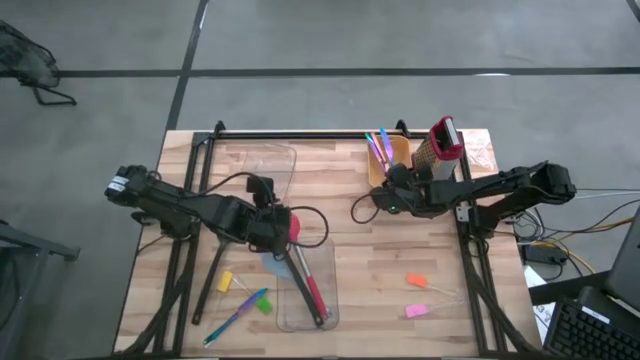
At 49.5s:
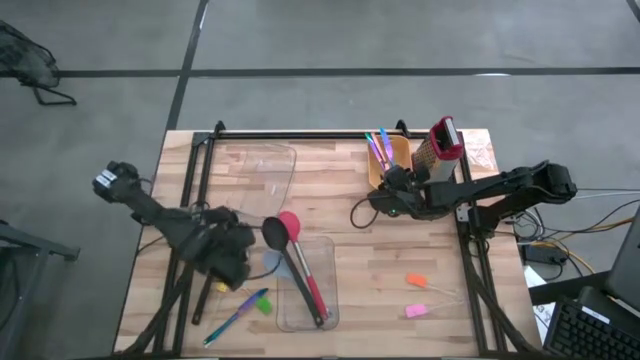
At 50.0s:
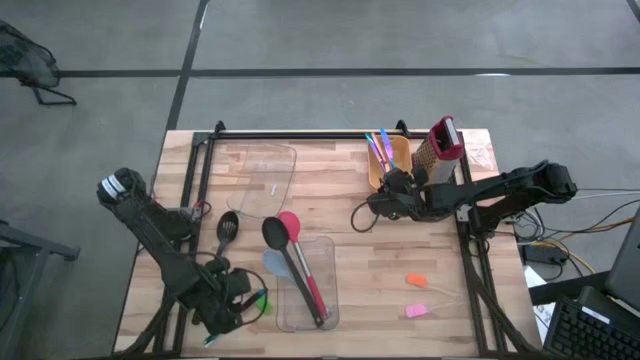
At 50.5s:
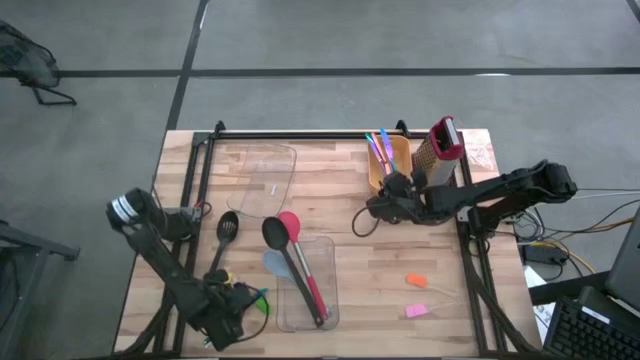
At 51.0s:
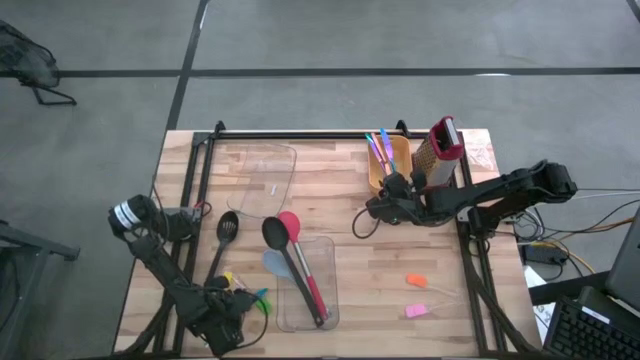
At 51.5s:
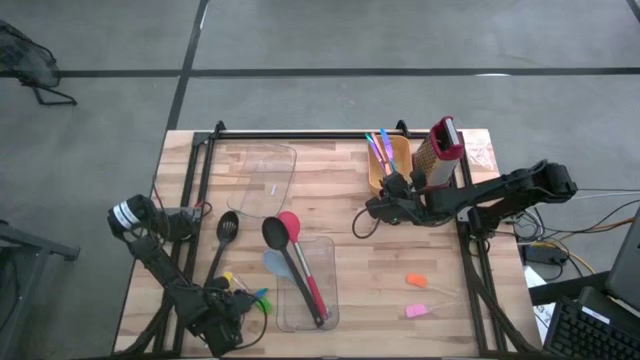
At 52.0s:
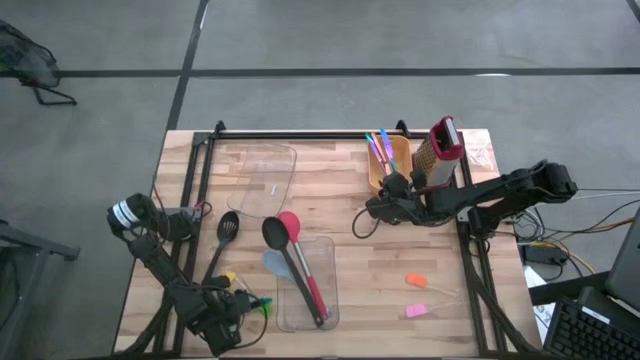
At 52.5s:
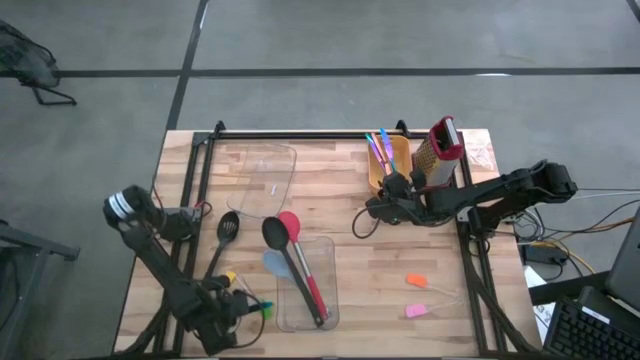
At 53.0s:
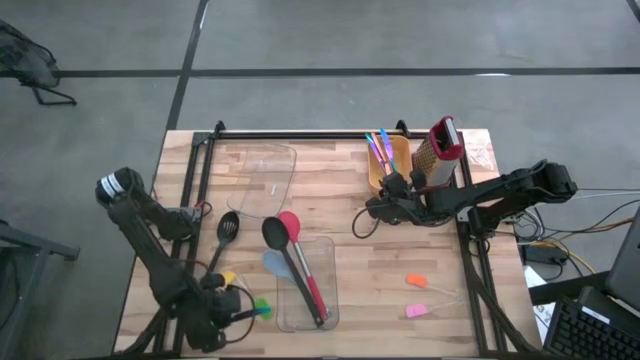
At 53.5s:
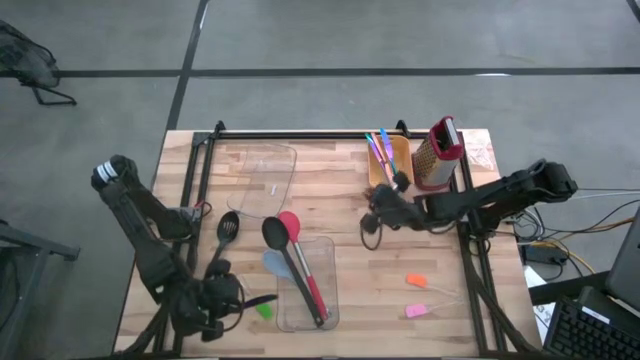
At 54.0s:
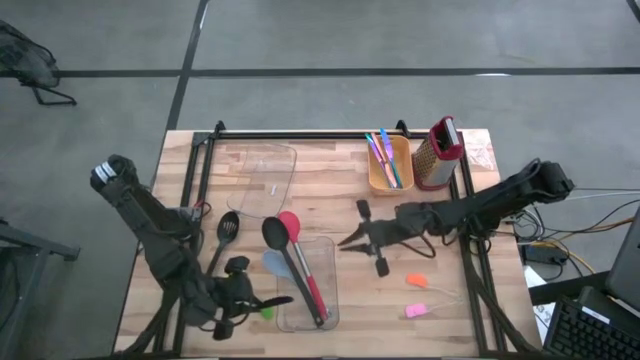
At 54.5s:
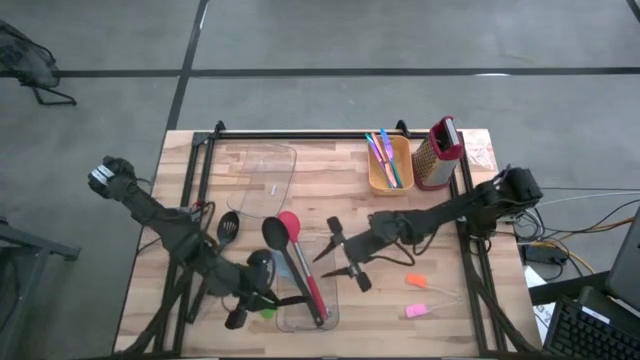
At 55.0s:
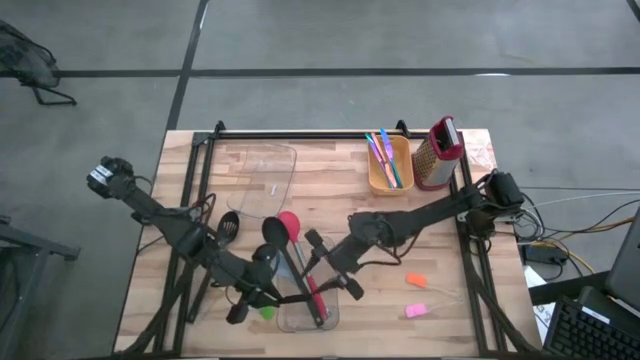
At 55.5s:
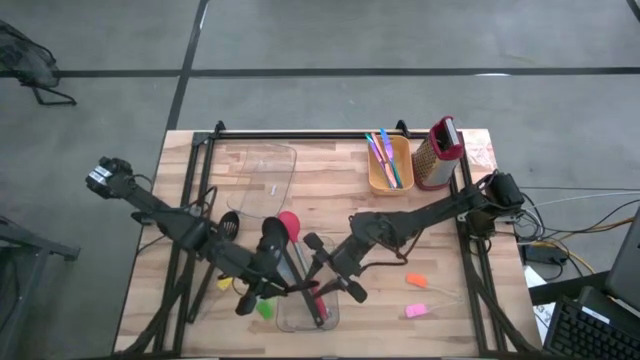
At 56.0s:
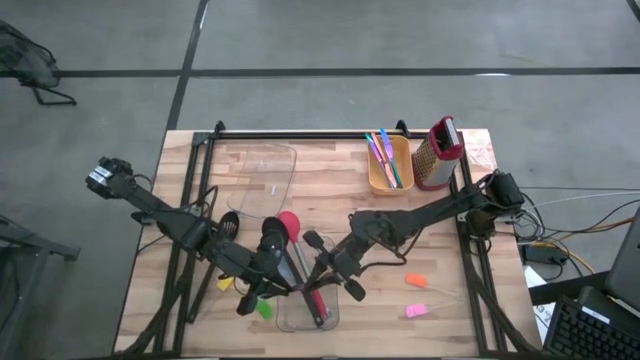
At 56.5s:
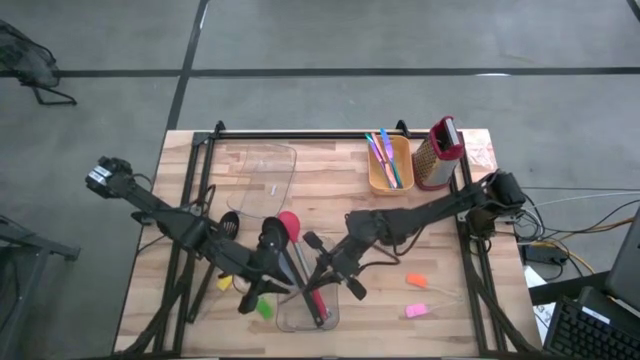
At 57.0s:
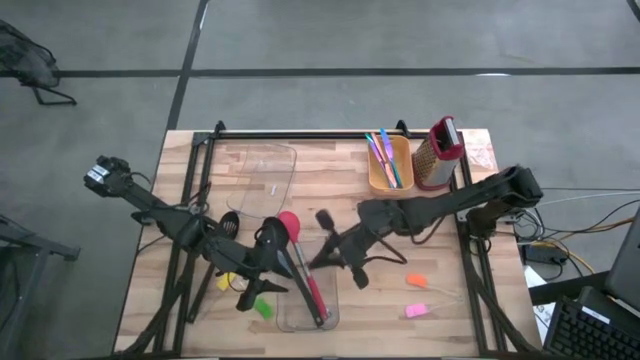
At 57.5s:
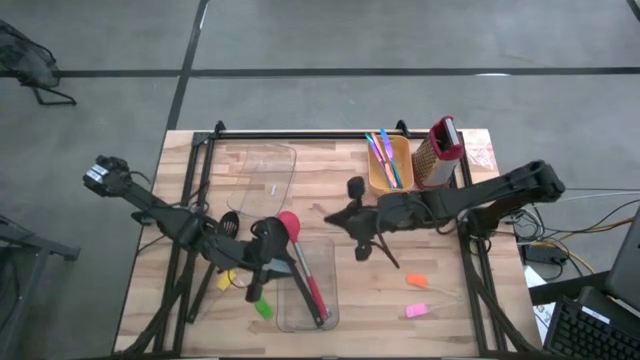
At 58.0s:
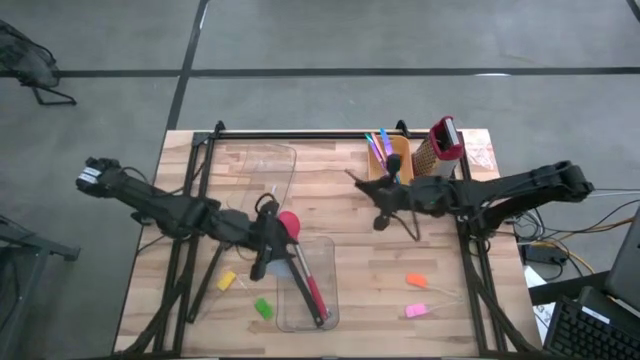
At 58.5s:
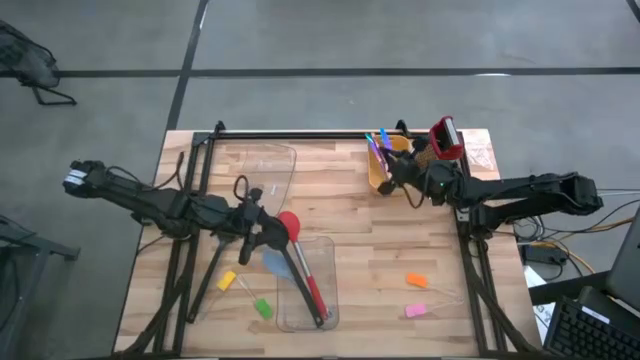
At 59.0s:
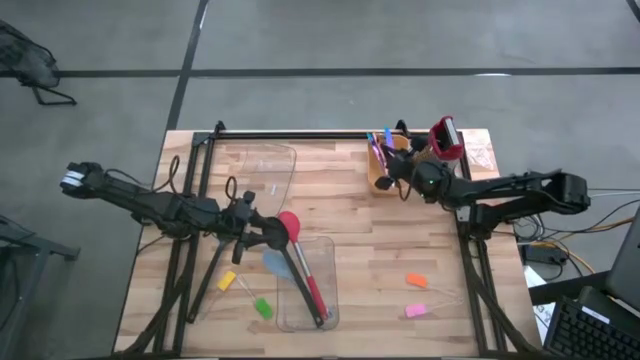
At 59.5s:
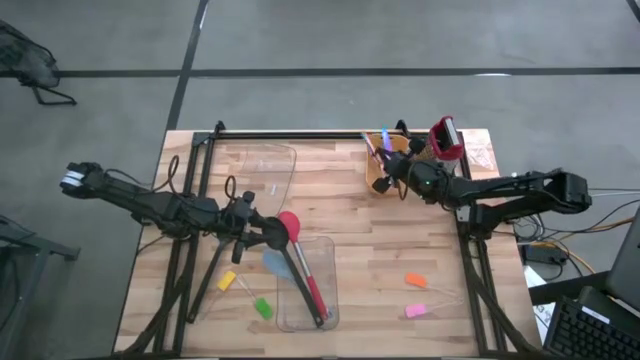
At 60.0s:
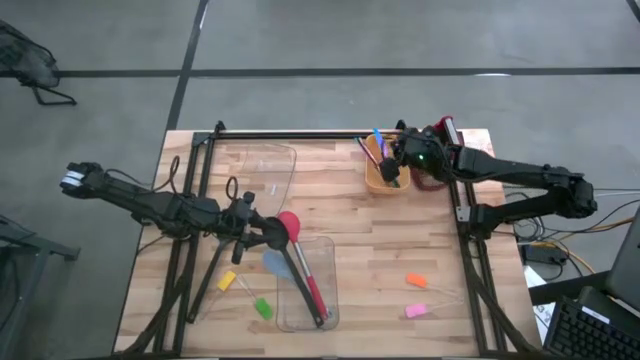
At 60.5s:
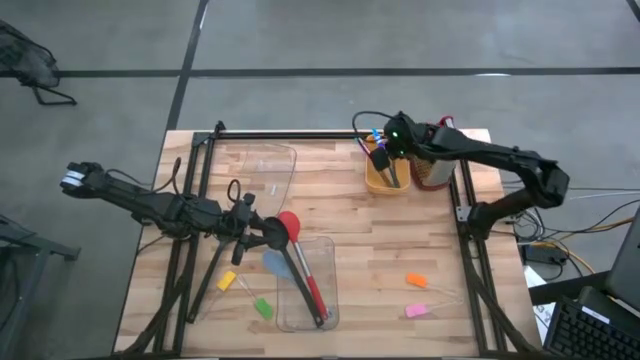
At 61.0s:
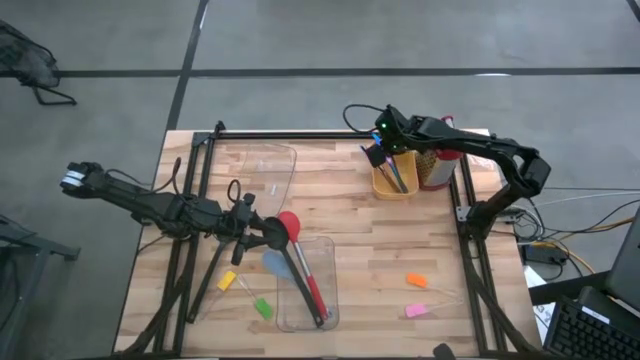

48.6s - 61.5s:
Task: Pick & Place Kitchen Items
Put the blue knife into the yellow bin

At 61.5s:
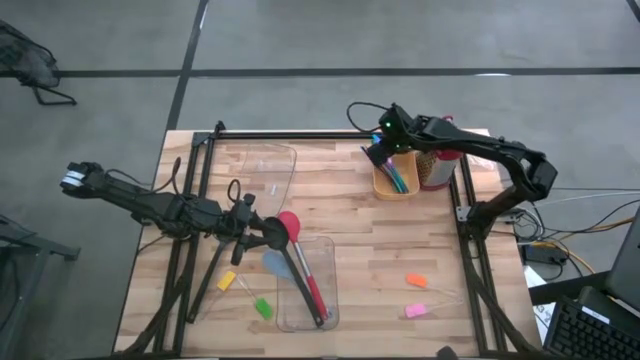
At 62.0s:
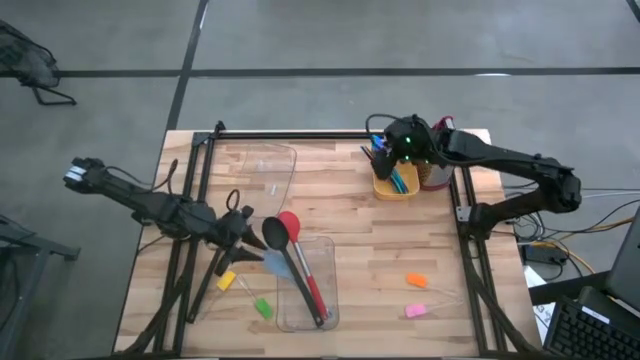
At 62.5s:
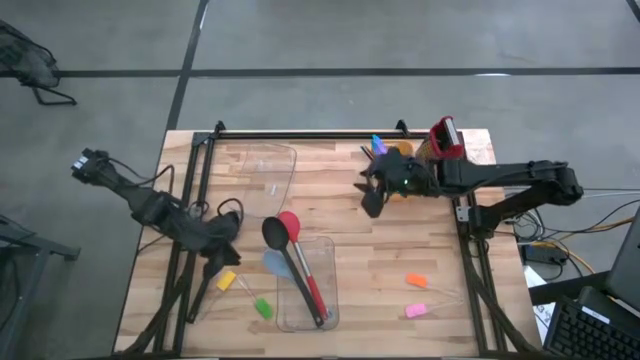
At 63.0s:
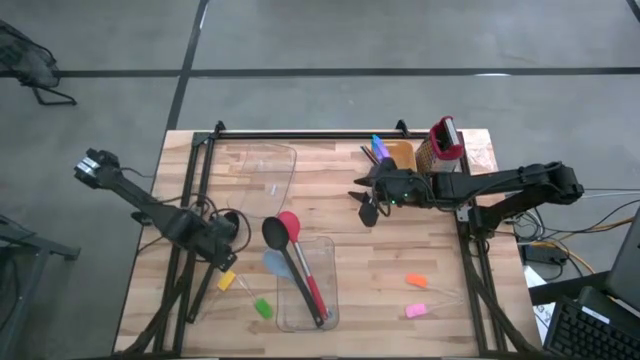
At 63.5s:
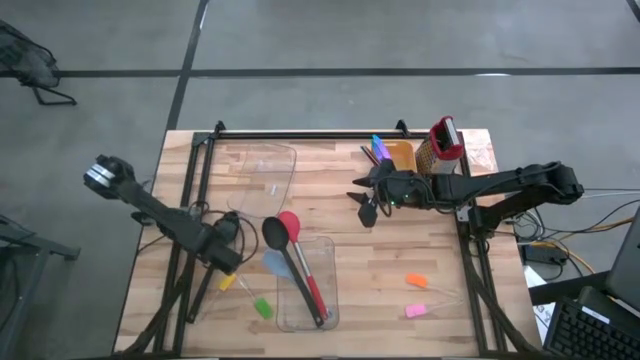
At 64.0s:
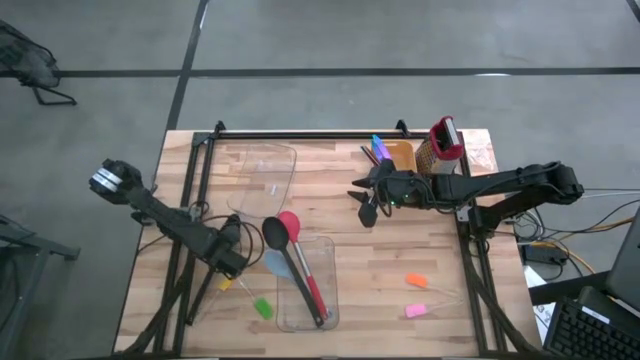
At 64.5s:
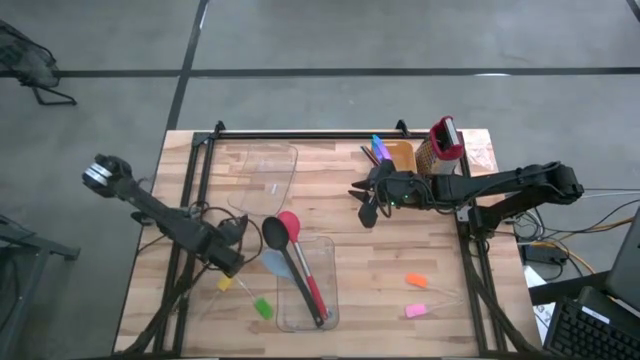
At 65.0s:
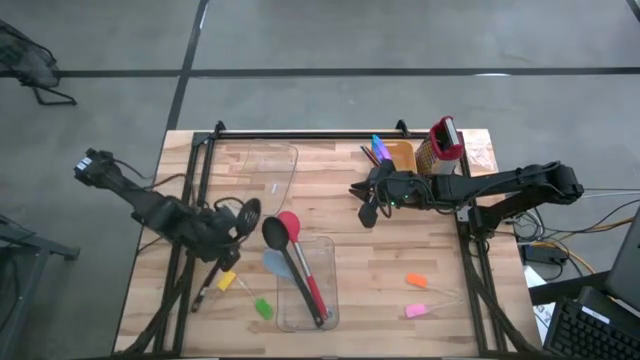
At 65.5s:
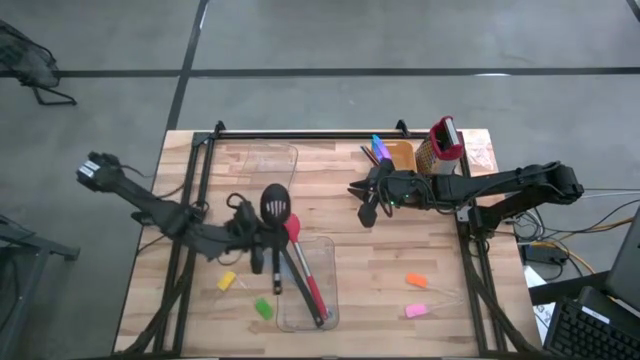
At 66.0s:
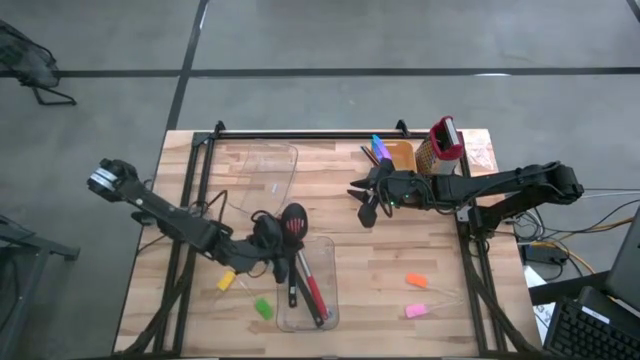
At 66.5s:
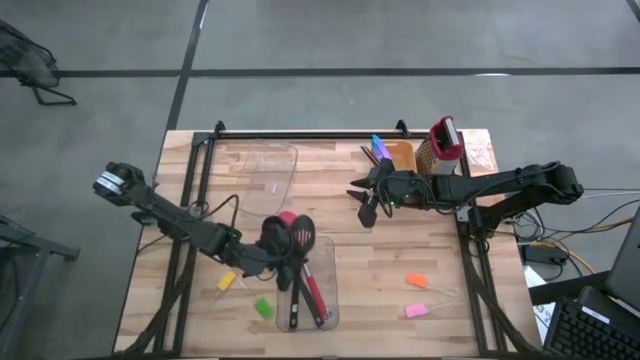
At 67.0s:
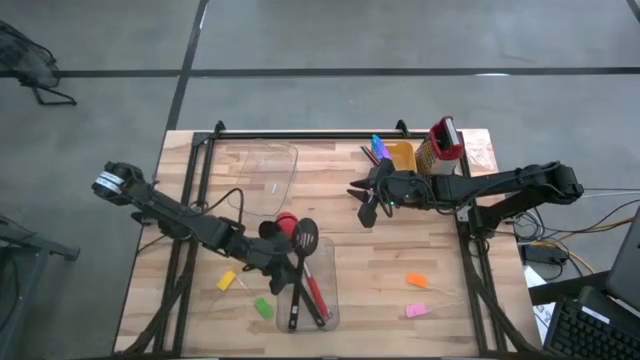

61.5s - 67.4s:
Put the black serving spoon into the bottom transparent bin

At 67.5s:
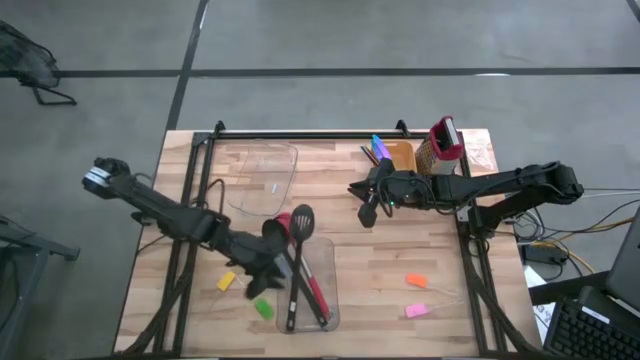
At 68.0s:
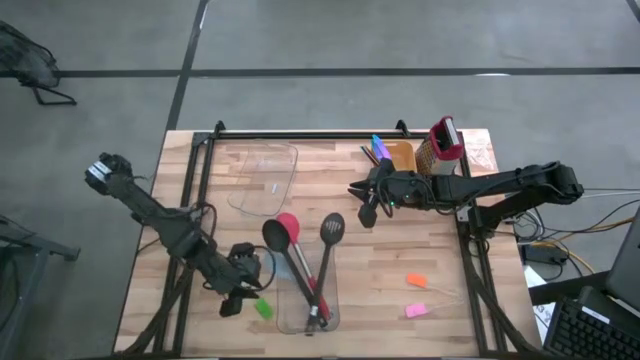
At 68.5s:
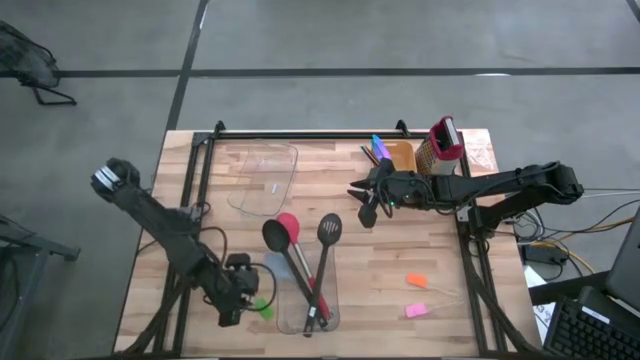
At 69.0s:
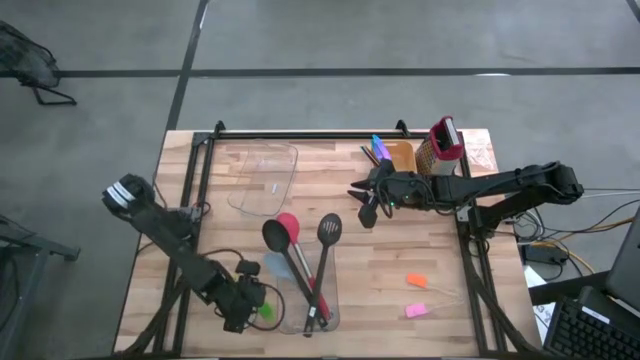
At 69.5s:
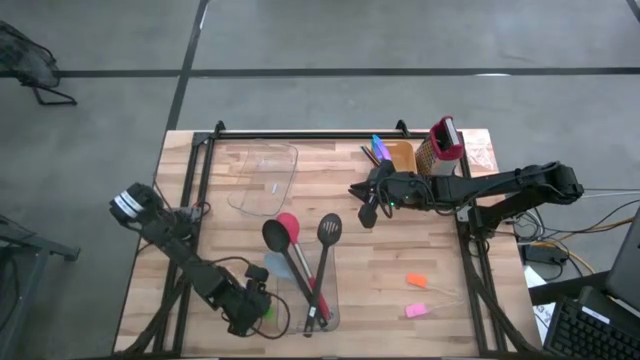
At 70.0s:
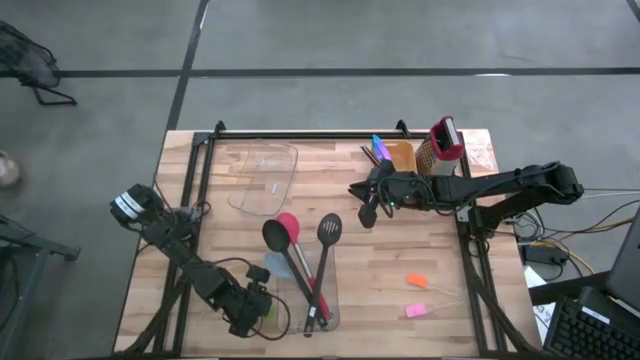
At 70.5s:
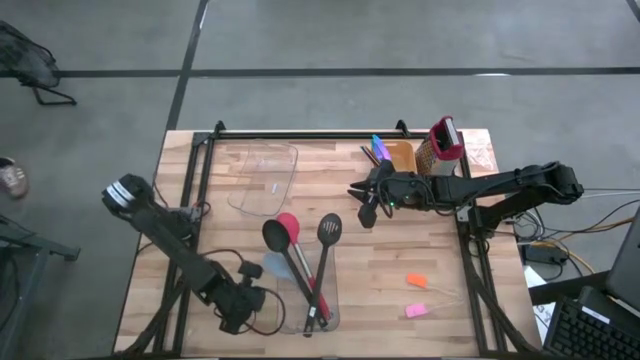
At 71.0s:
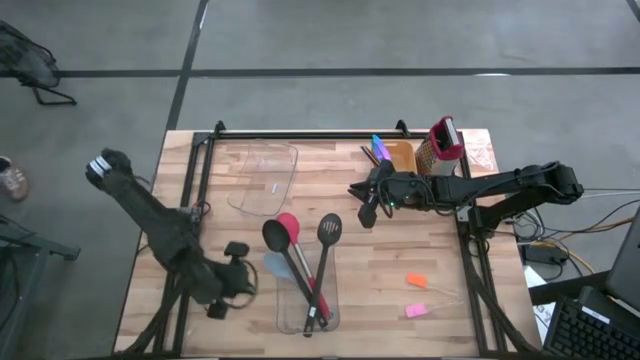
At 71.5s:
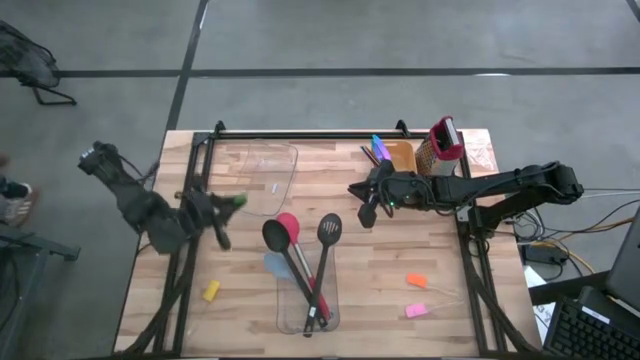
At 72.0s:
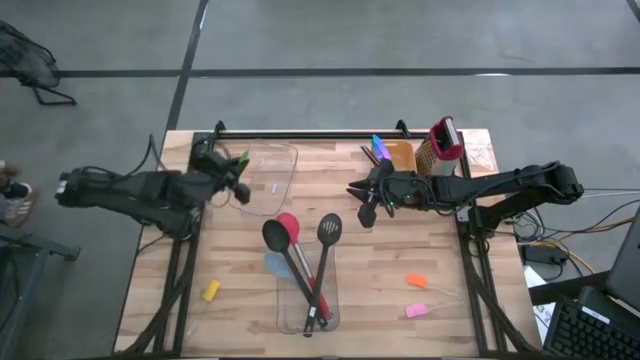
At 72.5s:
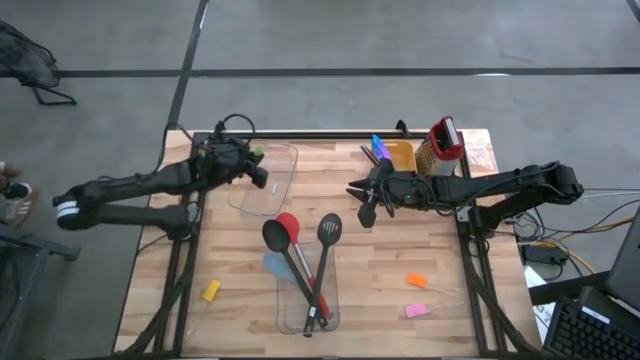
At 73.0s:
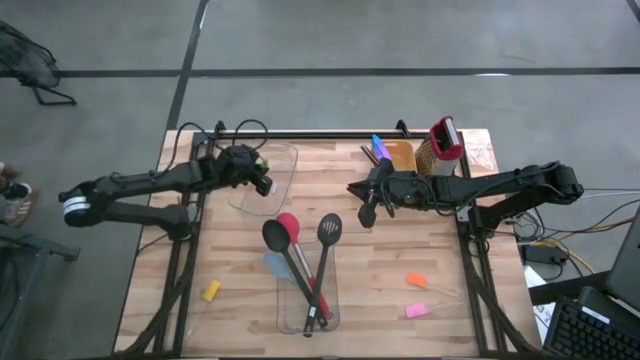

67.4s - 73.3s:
Put the green spatula into the top transparent bin
